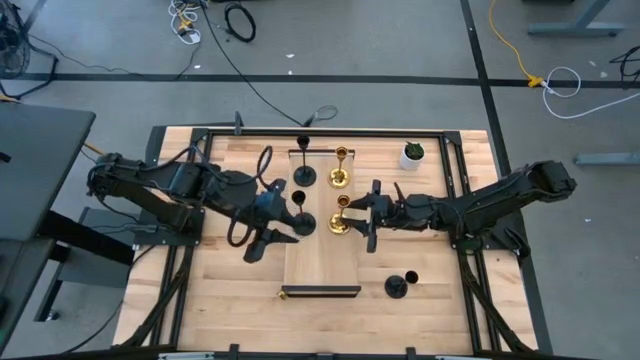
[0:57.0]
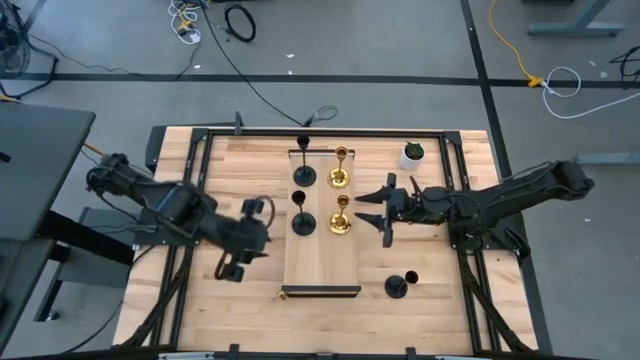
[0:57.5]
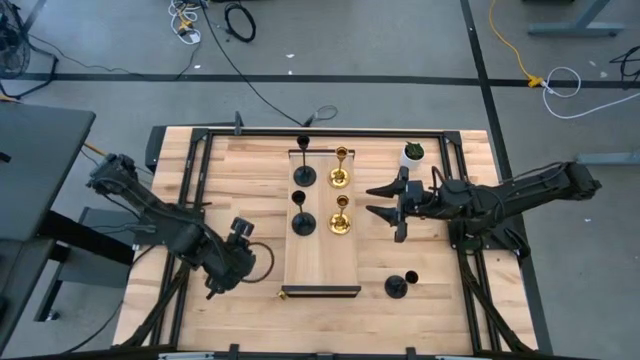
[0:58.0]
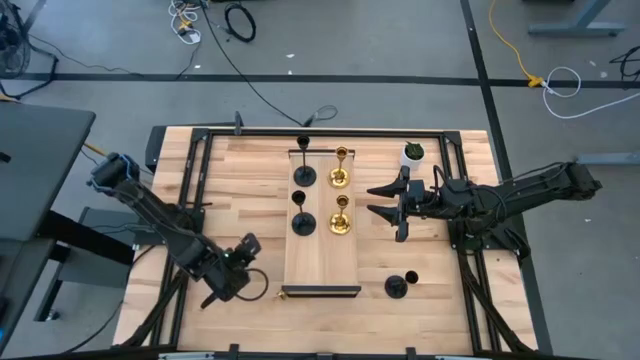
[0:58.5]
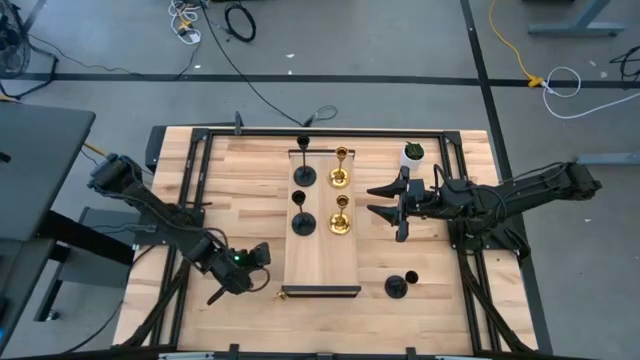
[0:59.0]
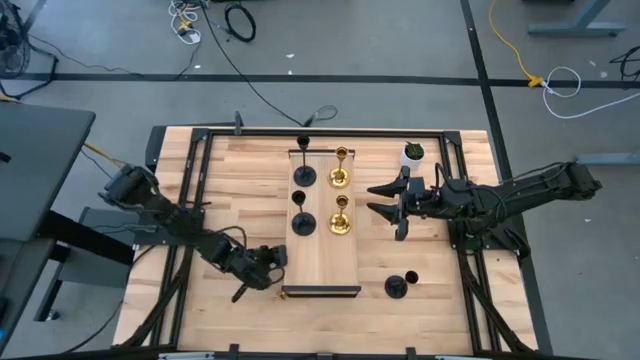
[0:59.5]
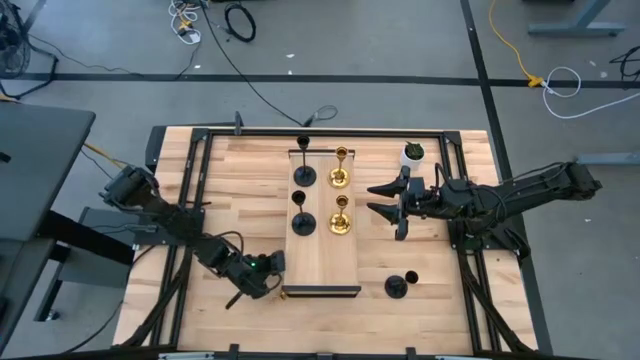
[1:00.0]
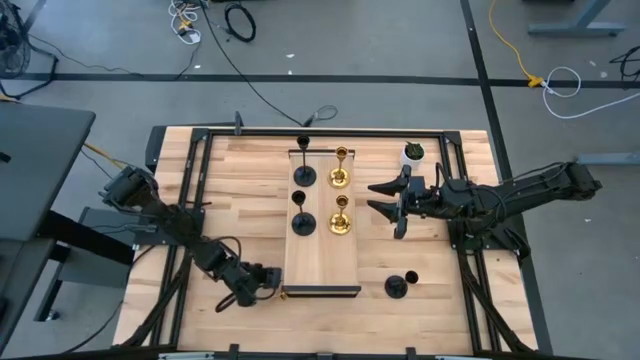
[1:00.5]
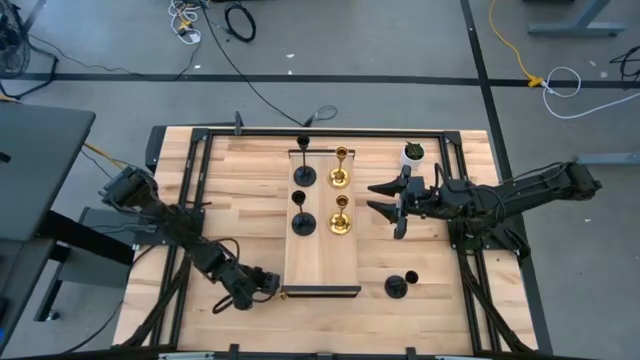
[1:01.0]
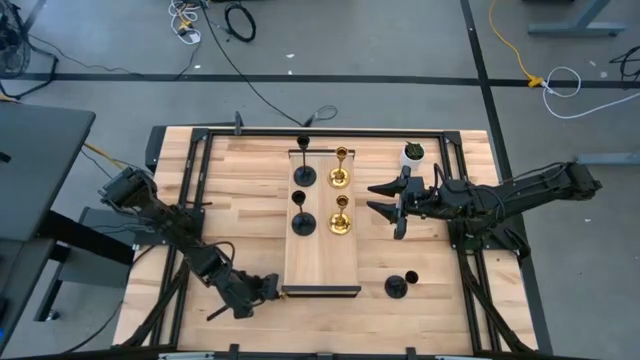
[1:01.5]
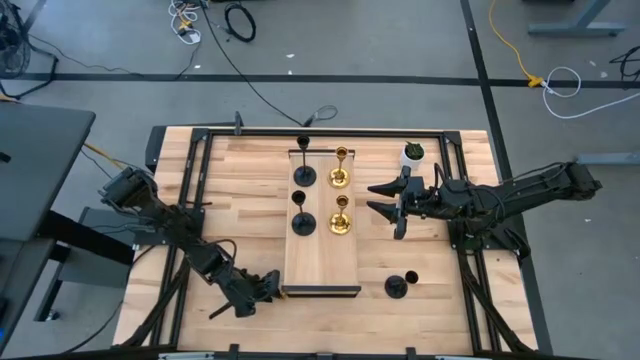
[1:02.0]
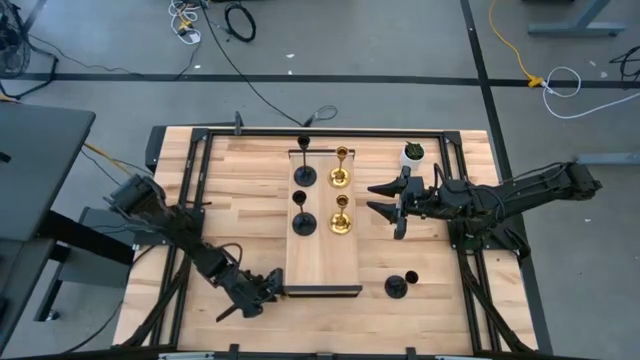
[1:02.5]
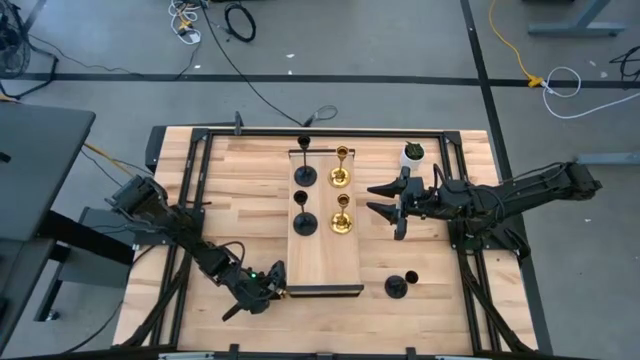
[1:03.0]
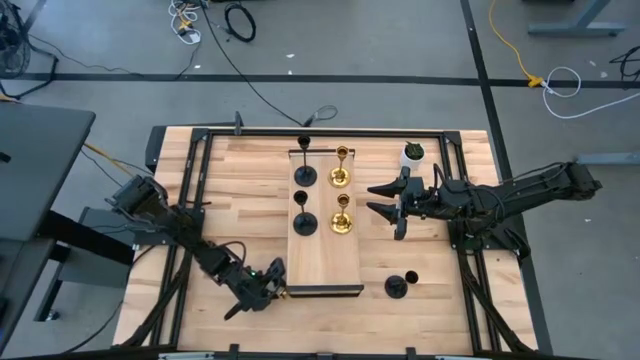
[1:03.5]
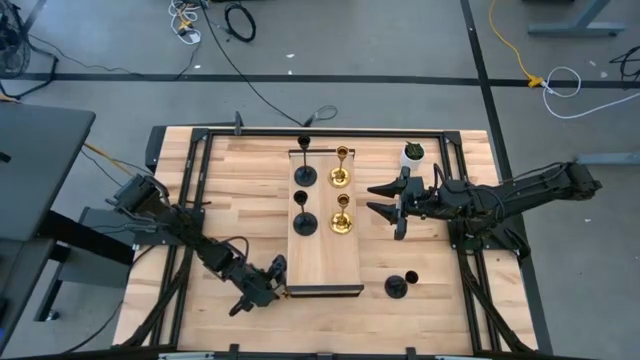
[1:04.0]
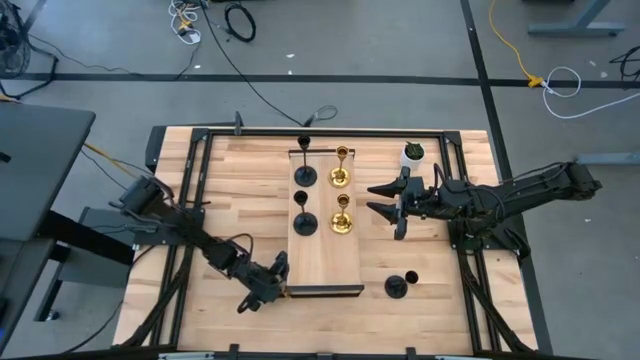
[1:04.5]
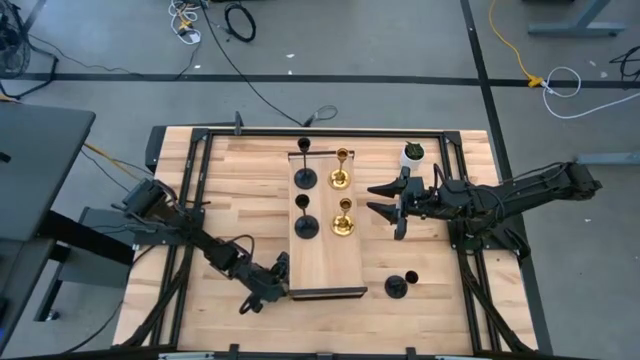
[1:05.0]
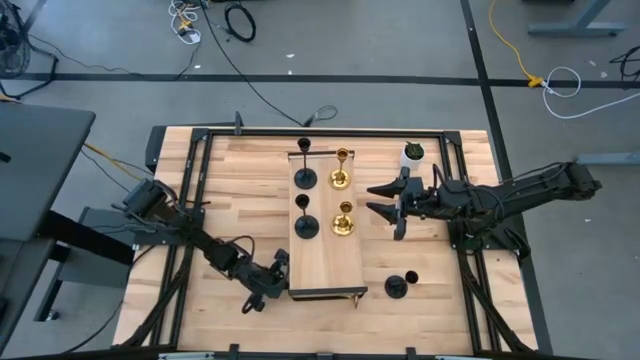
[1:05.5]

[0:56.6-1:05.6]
Task: Pick & Place candle stick holders
Put the golden candle holder on the shelf

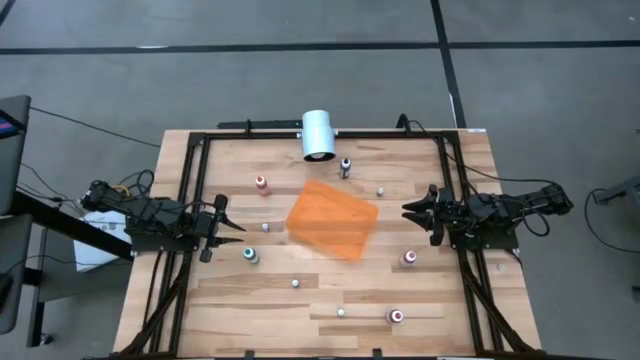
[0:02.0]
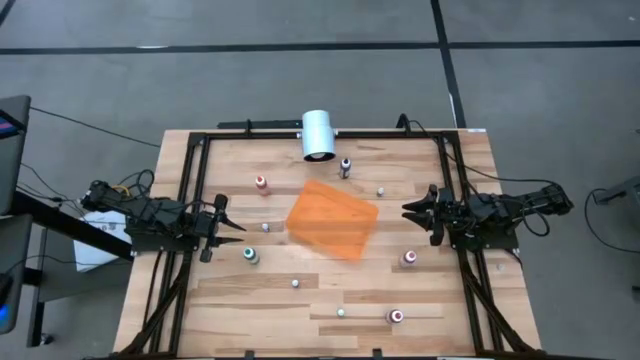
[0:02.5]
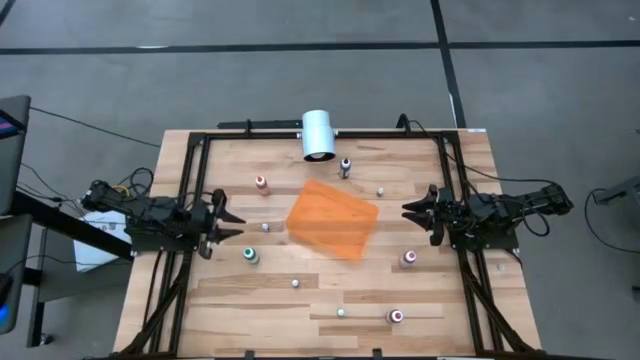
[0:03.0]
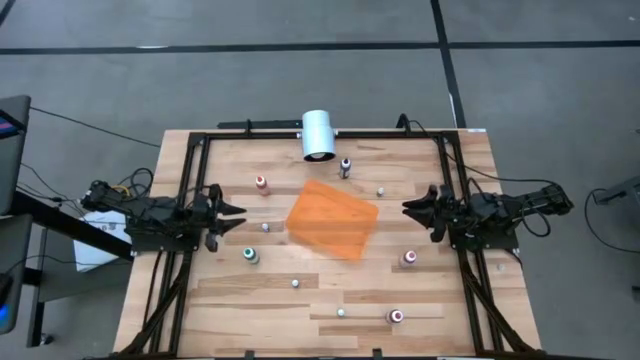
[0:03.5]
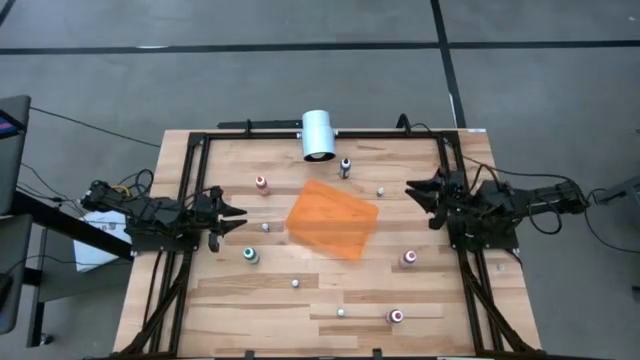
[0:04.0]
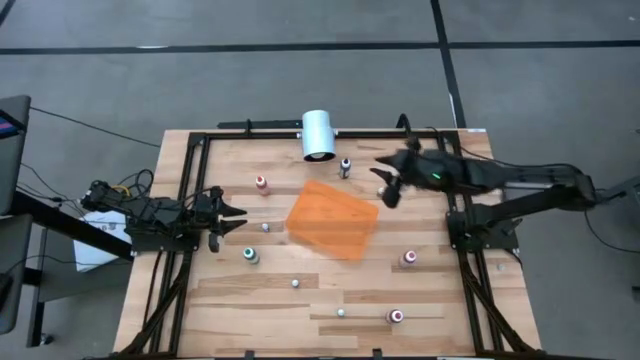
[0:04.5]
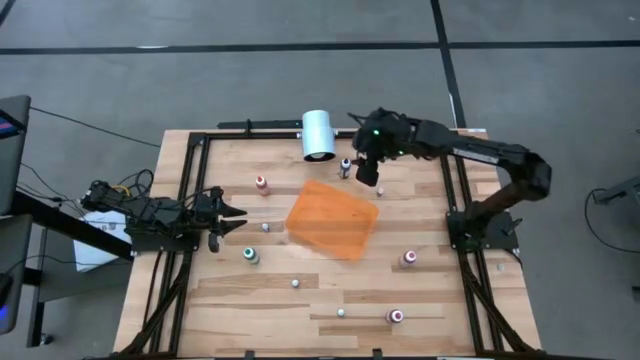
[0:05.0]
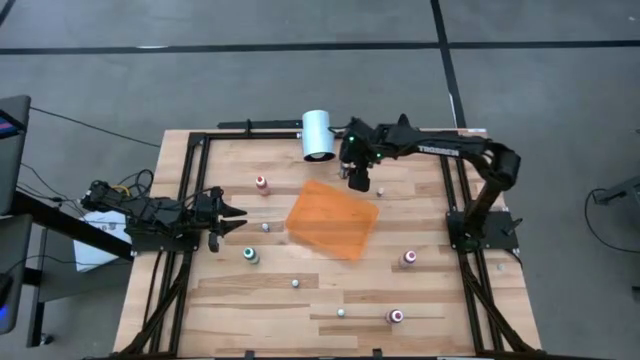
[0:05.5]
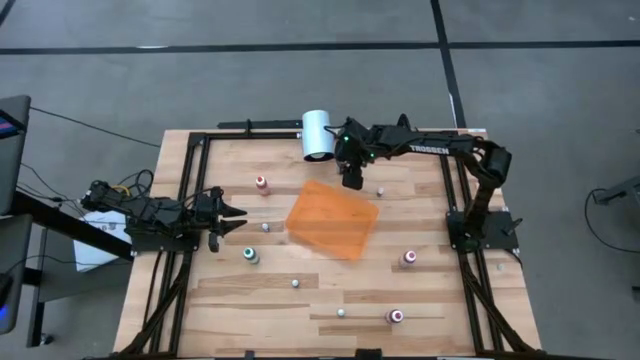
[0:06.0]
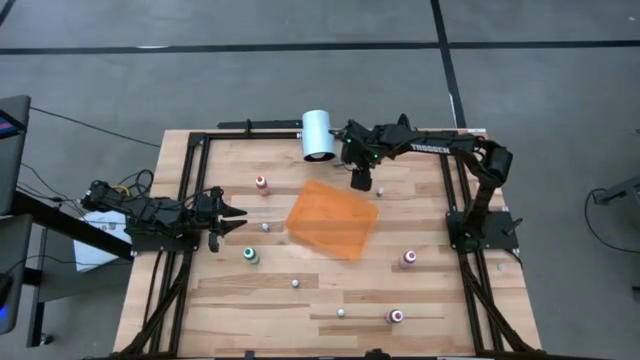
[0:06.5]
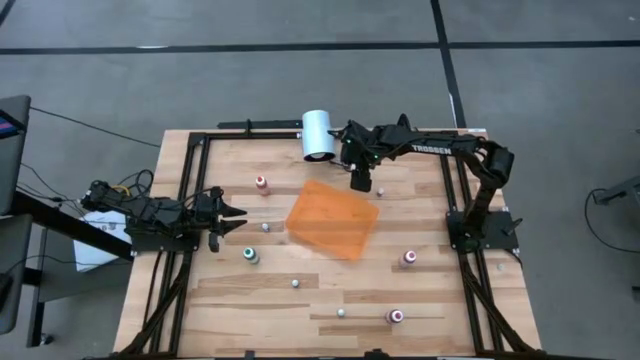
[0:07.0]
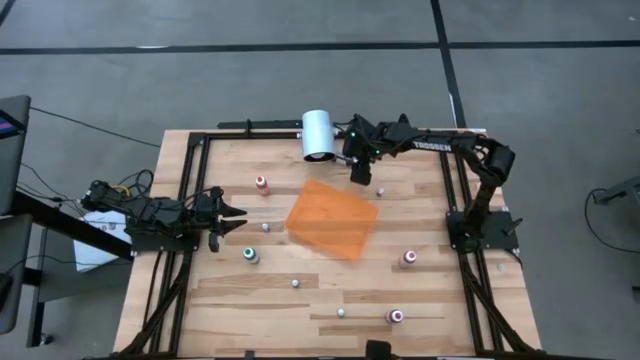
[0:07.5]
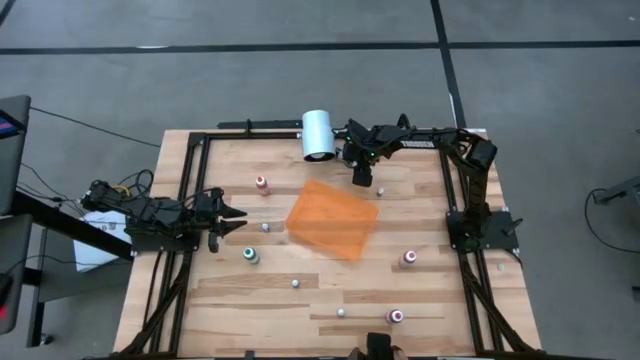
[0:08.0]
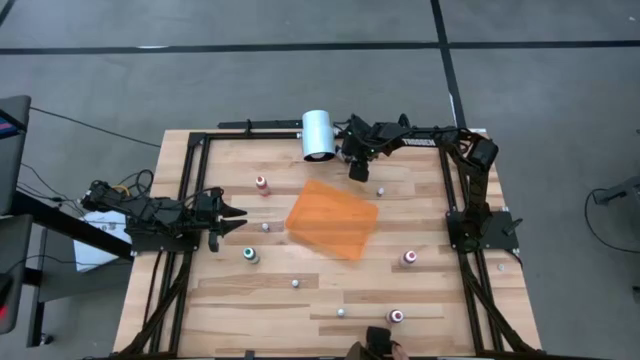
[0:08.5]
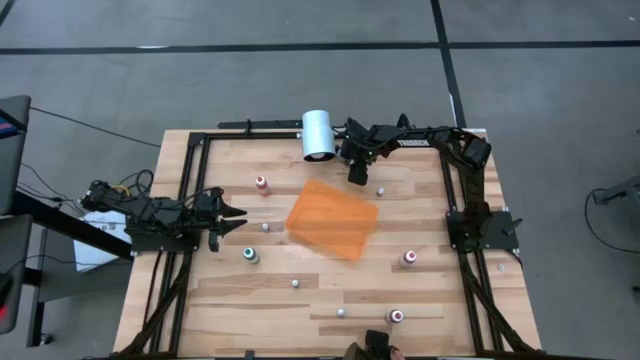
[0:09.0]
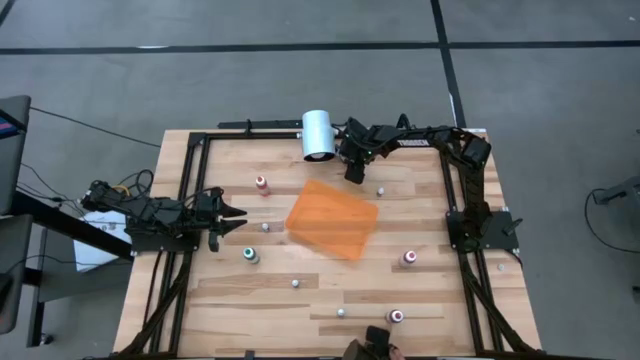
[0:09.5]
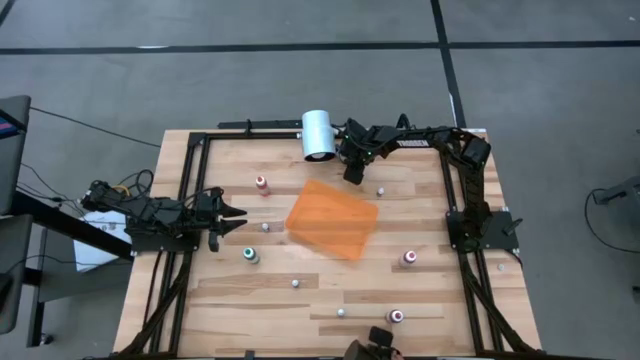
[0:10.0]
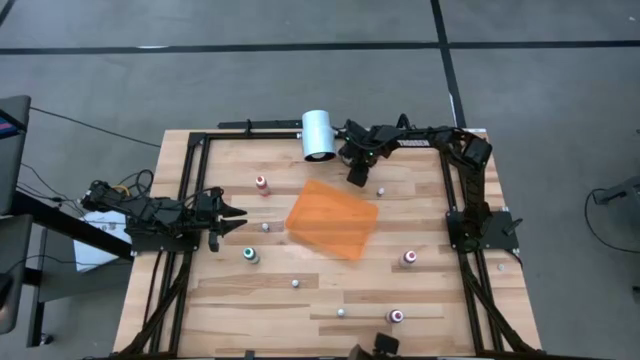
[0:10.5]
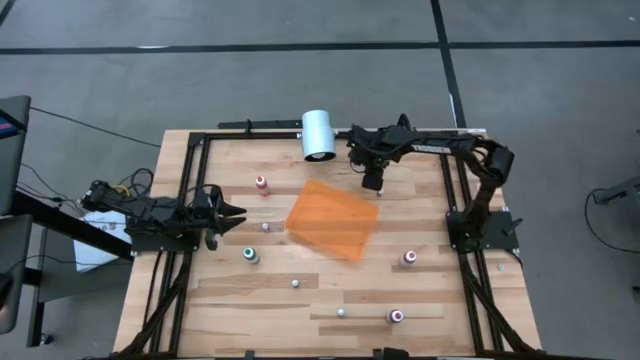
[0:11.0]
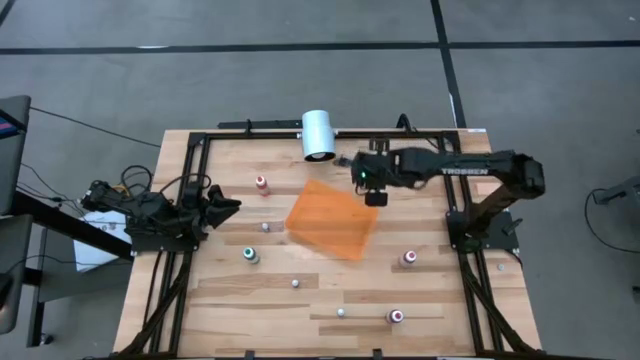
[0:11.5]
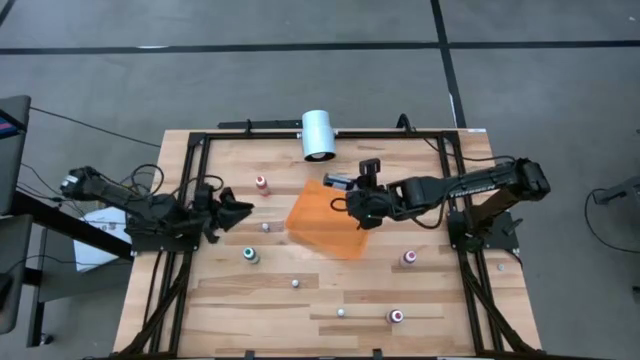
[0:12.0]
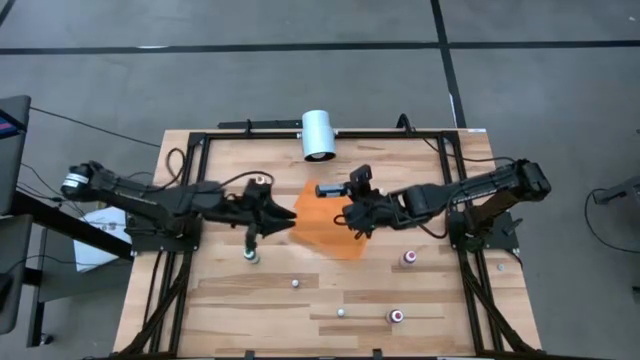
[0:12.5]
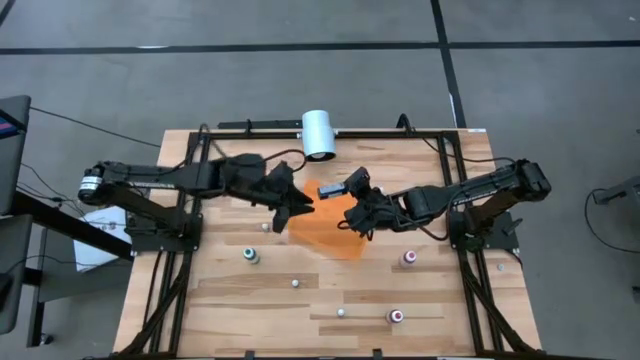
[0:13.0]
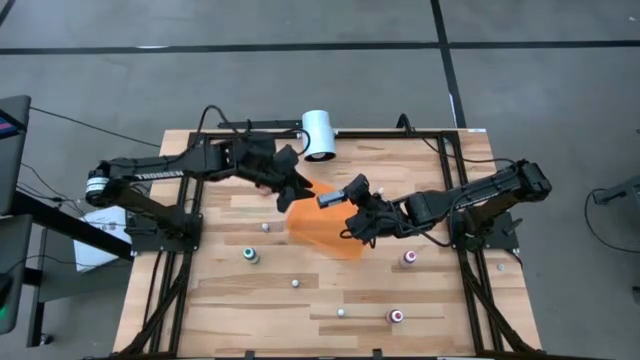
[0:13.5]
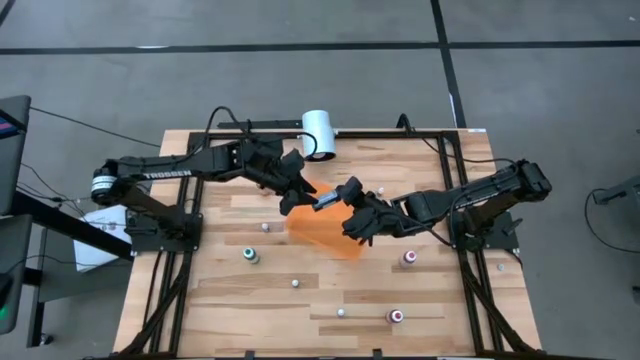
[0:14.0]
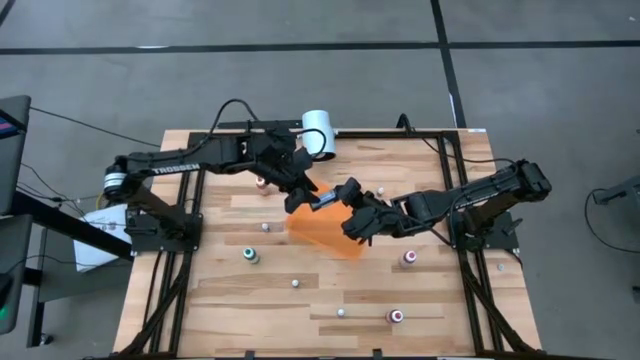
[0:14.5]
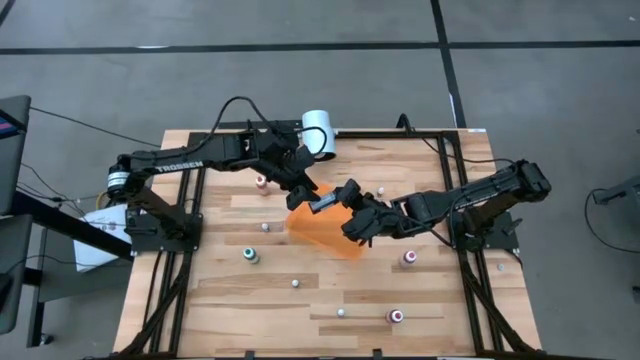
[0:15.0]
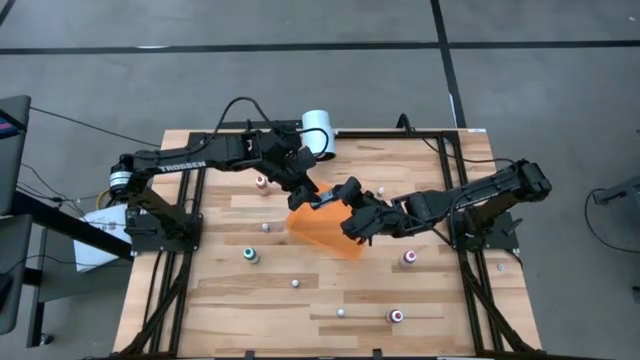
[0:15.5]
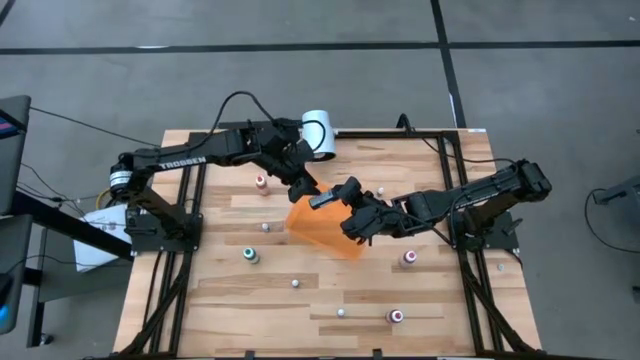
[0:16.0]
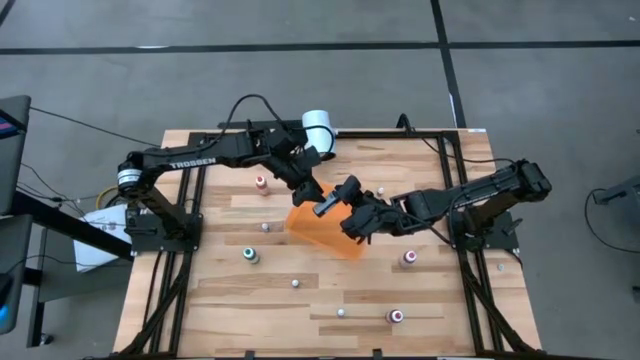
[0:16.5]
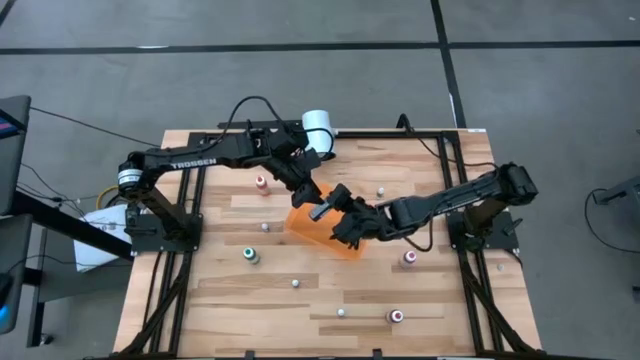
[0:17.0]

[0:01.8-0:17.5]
Task: Pick & Place food coloring
Put the large black food coloring bottle into the bin
